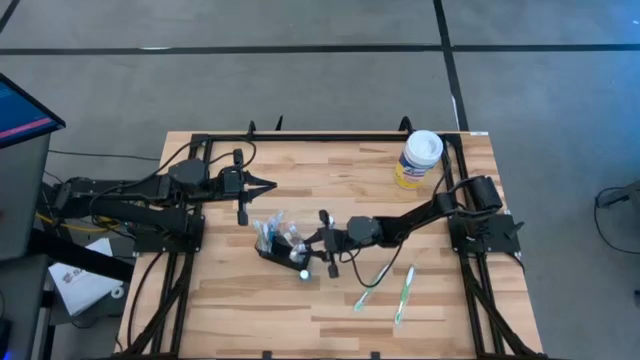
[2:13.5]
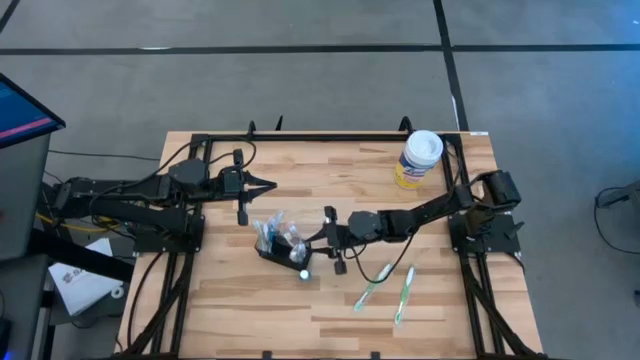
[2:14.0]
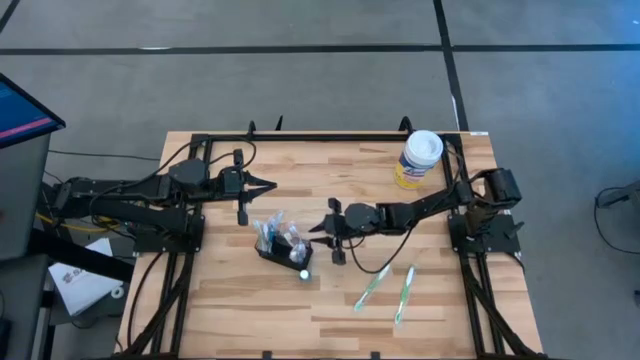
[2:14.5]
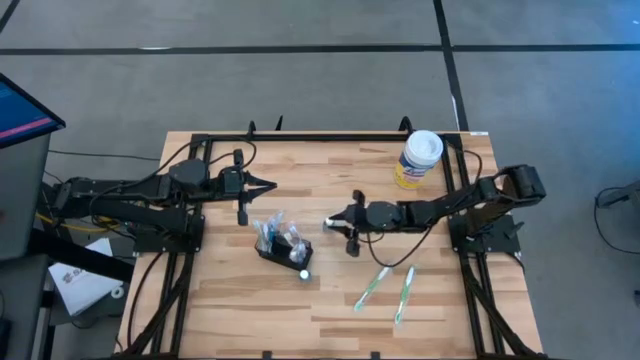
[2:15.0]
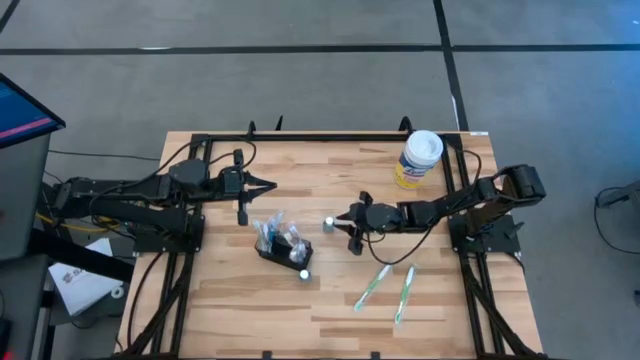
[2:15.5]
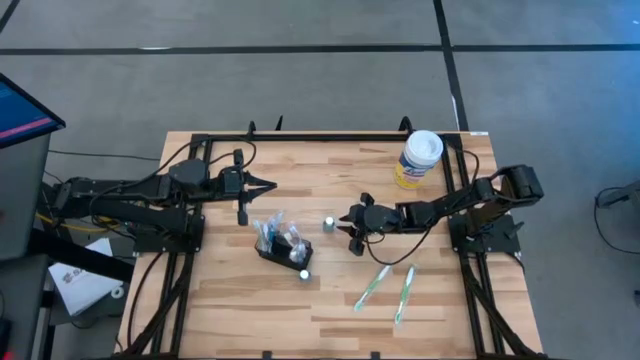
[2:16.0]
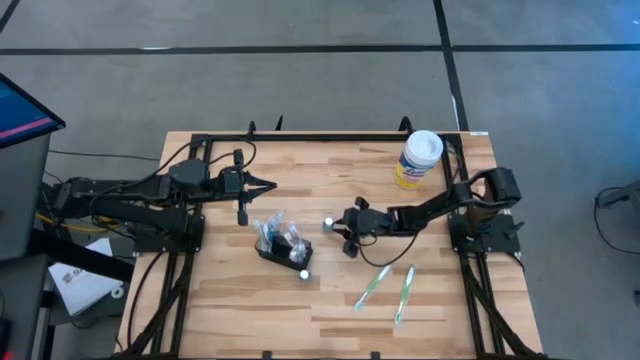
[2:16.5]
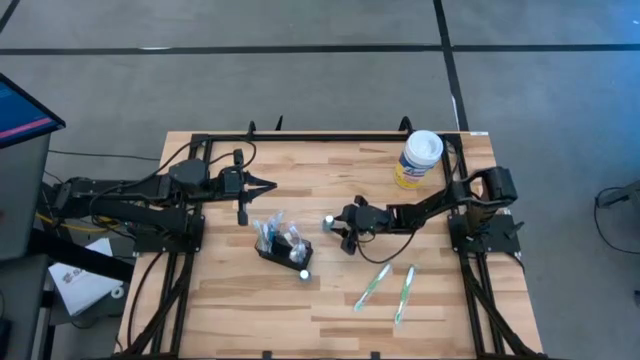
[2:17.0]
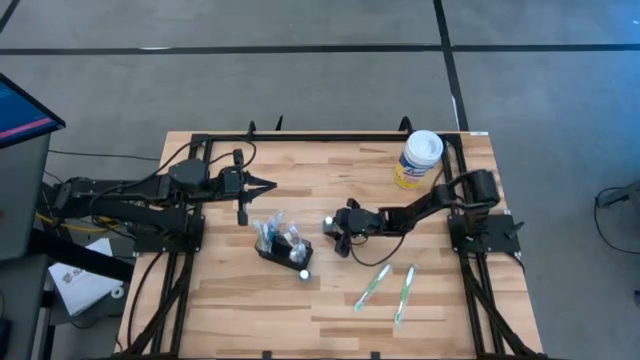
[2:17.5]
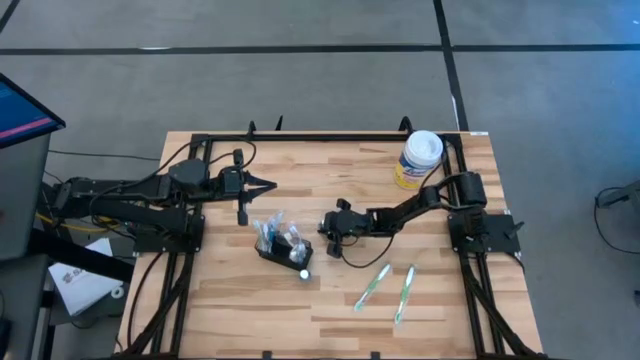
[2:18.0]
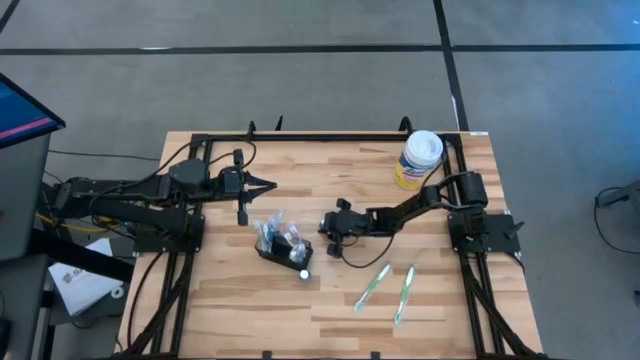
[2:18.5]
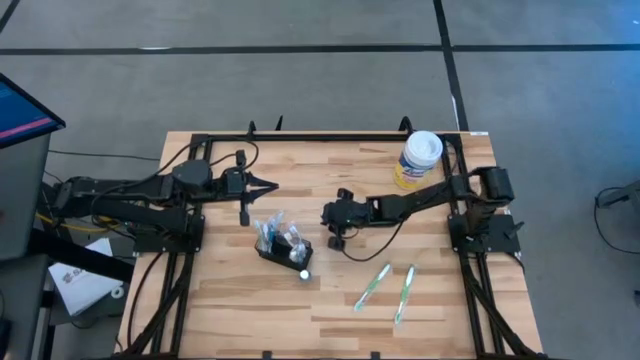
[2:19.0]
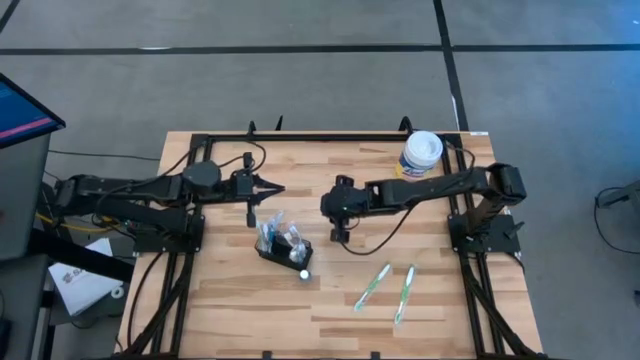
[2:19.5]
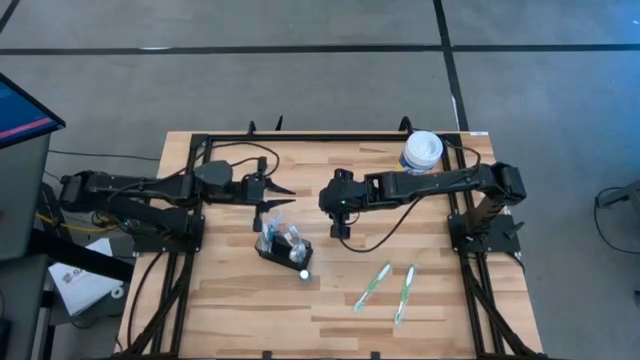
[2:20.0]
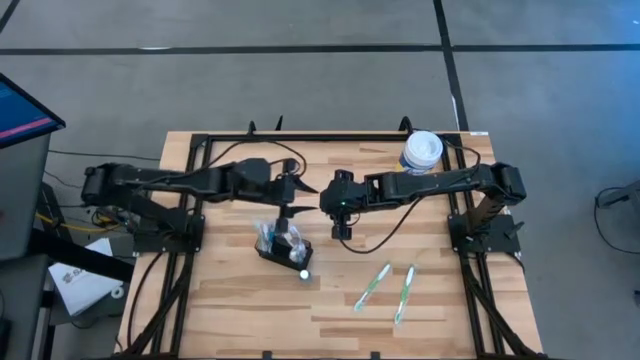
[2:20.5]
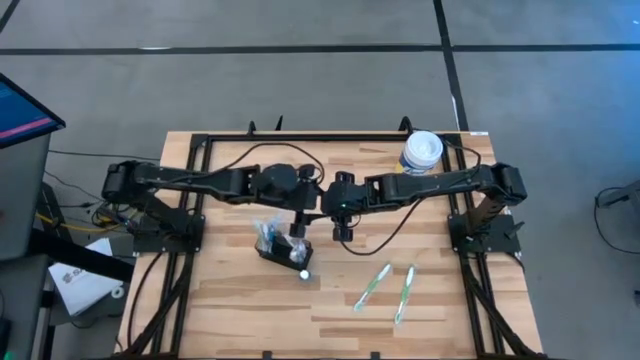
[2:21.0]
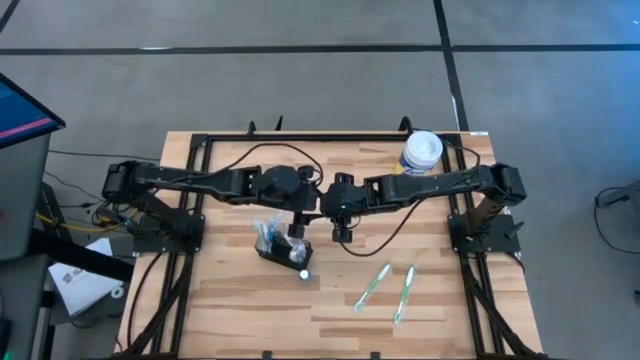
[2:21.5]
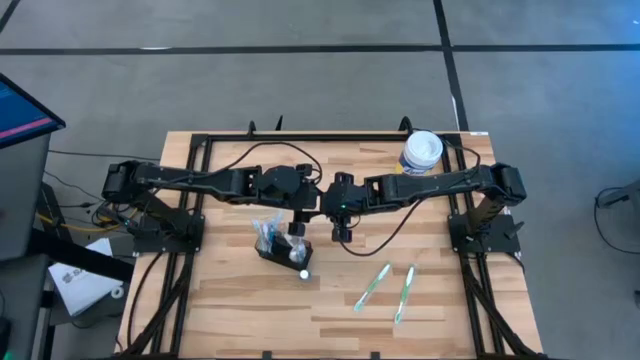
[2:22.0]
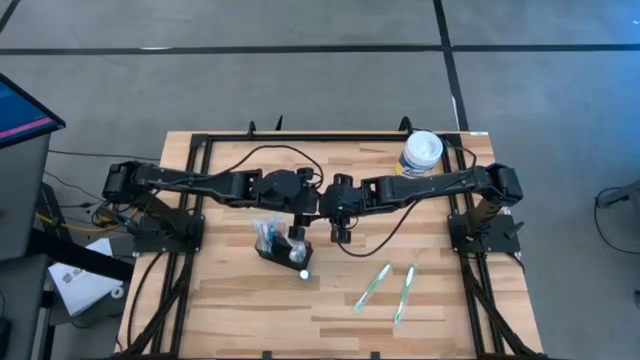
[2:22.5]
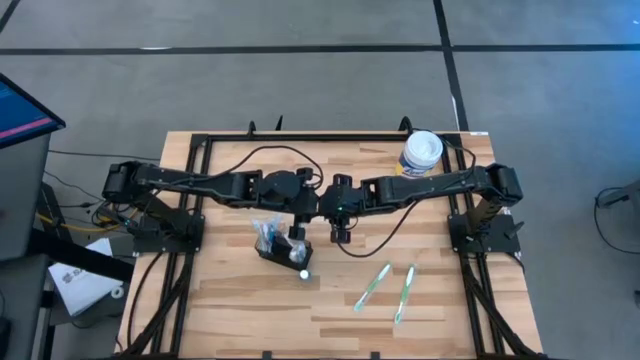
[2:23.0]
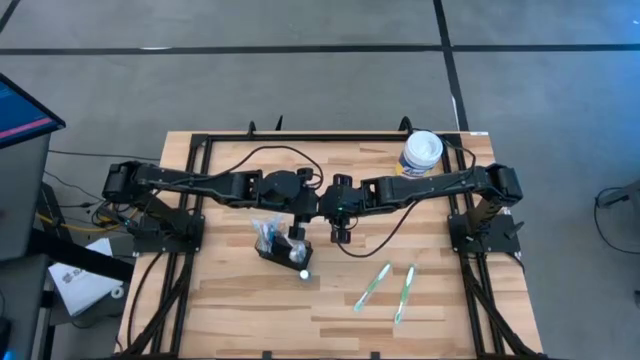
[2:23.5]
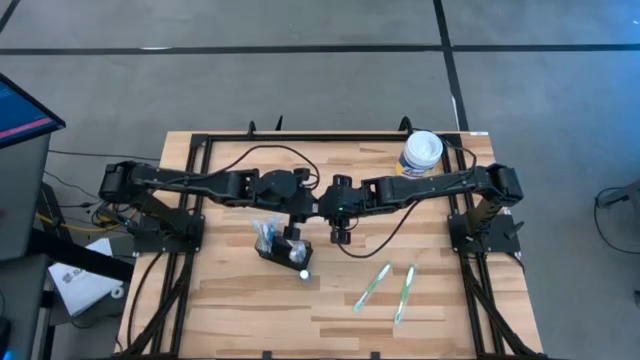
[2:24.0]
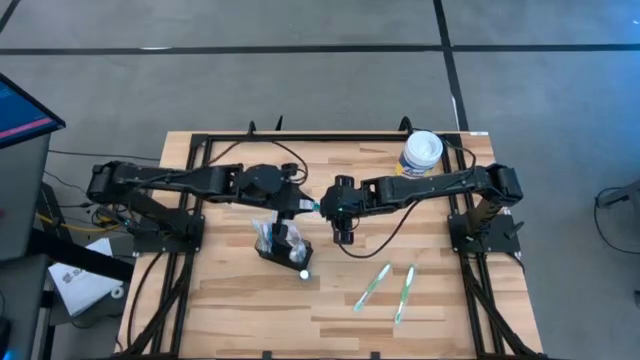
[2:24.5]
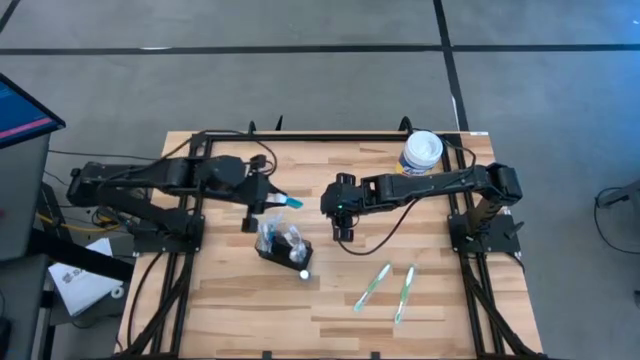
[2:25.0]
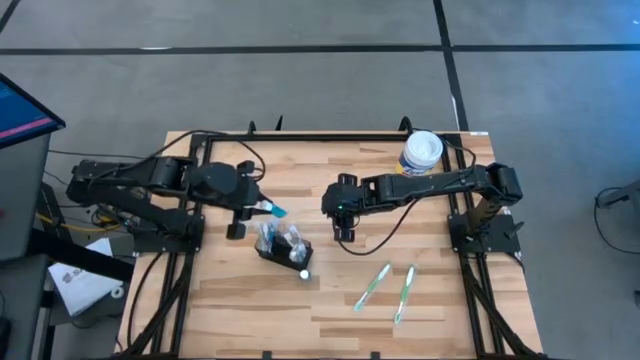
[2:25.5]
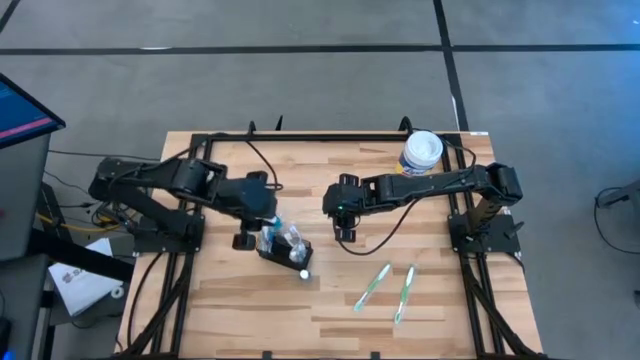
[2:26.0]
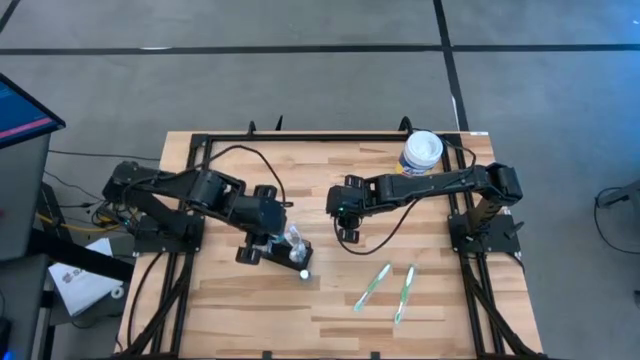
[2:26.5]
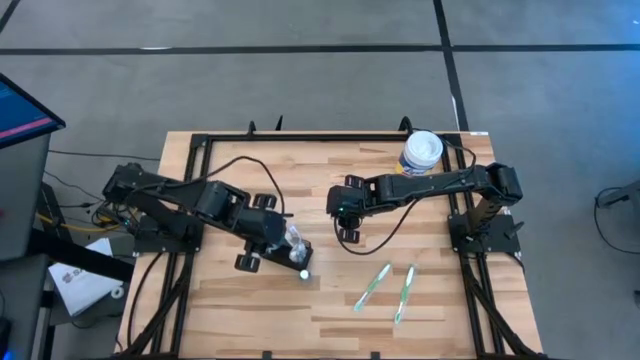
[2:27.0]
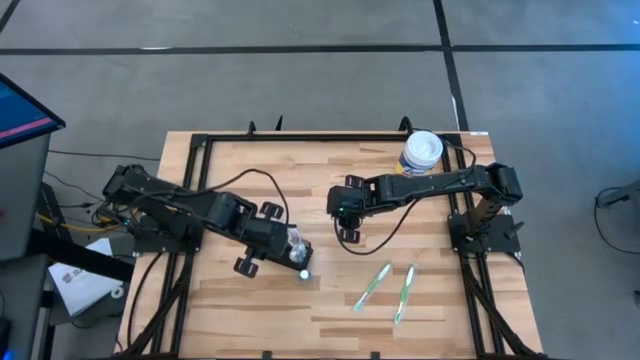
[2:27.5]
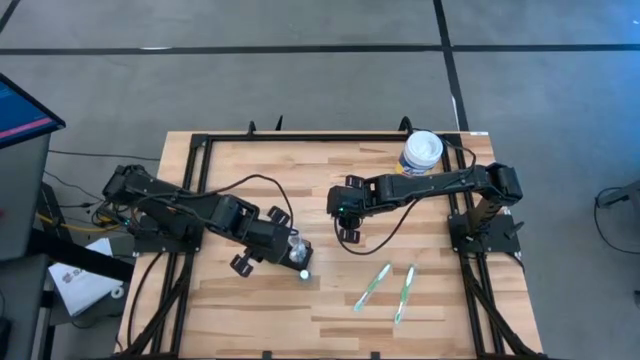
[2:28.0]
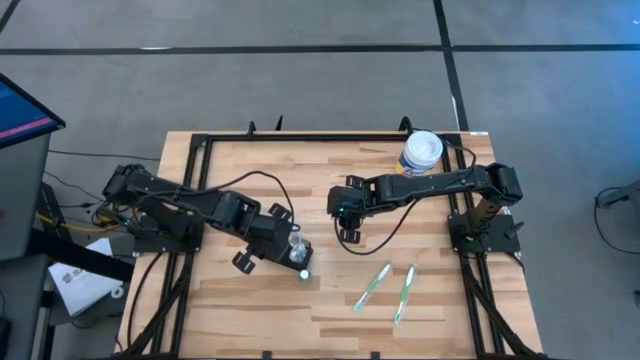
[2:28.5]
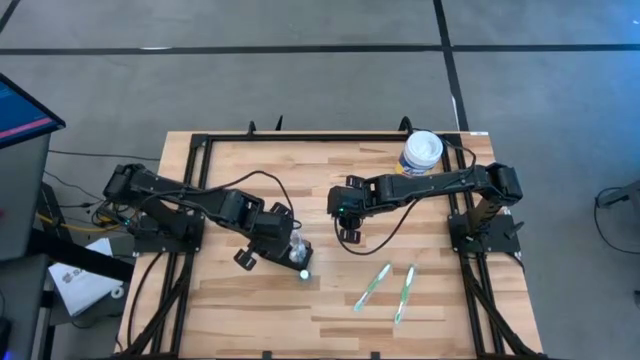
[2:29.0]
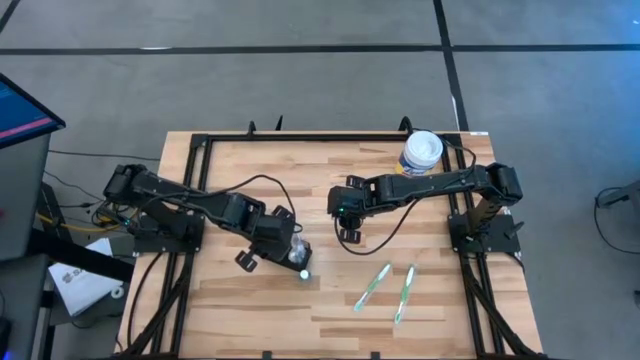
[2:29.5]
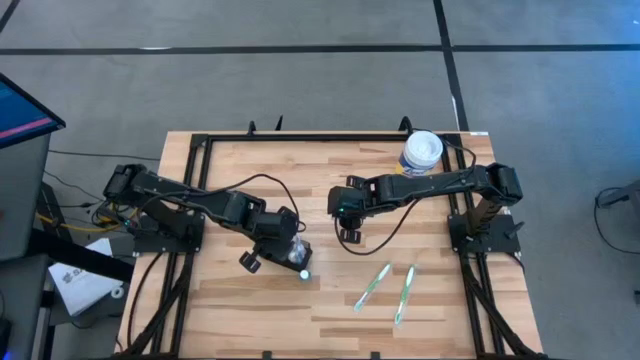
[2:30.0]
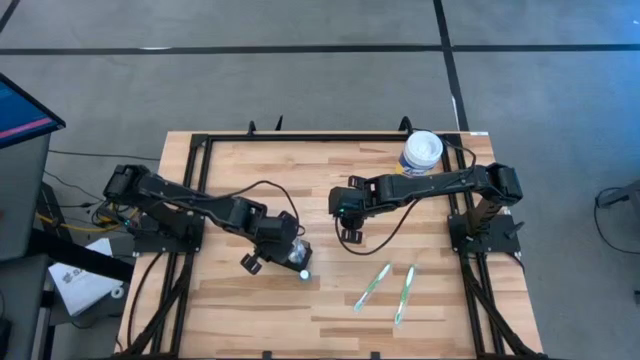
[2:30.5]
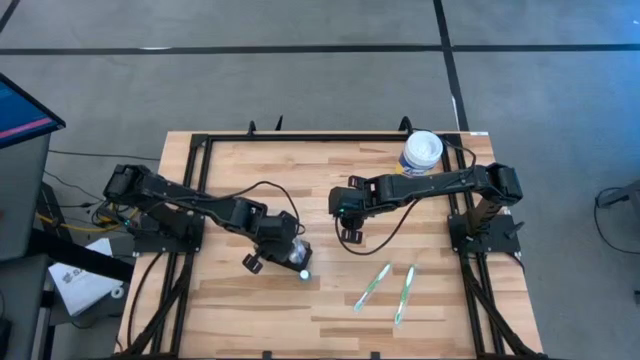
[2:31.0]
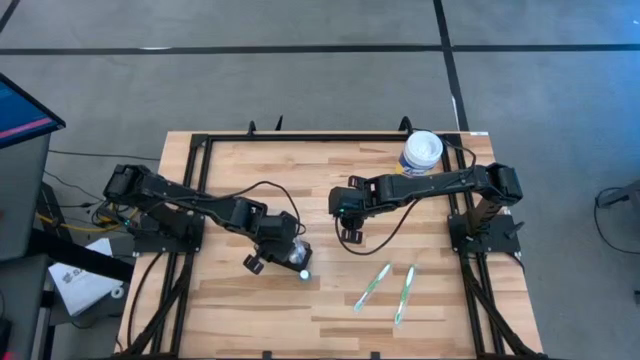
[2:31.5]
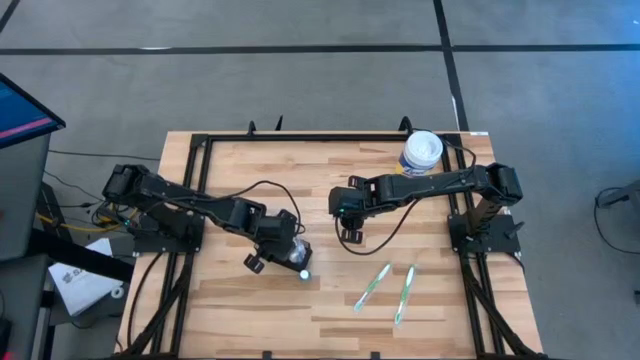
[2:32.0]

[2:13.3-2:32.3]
Task: Pick & Place toothbrushing station
Put the top blue mouthwash into the middle compartment of the wire organizer

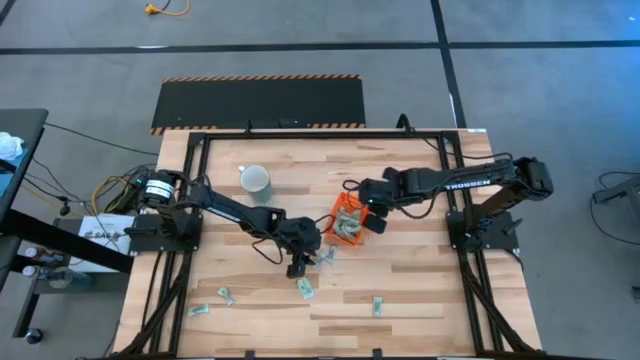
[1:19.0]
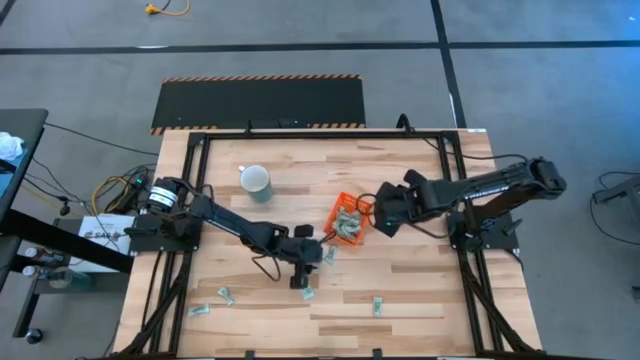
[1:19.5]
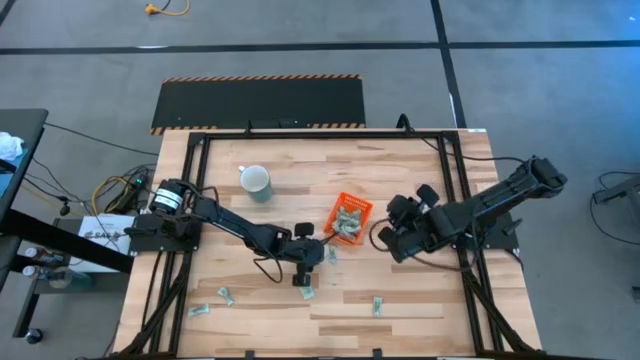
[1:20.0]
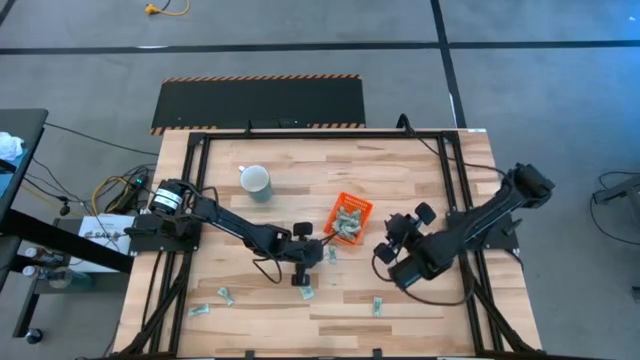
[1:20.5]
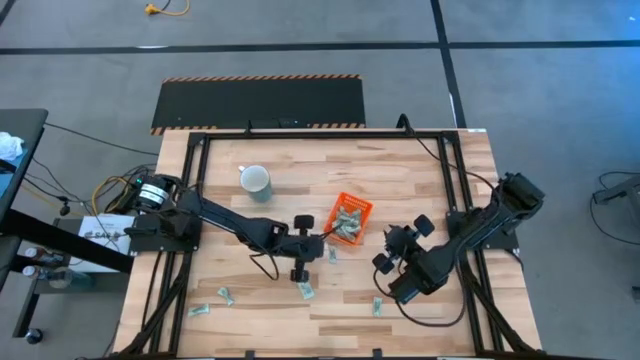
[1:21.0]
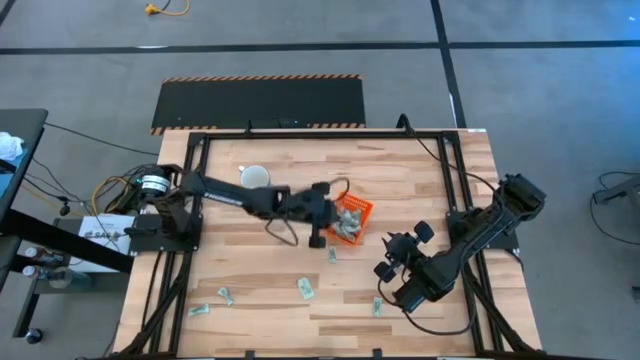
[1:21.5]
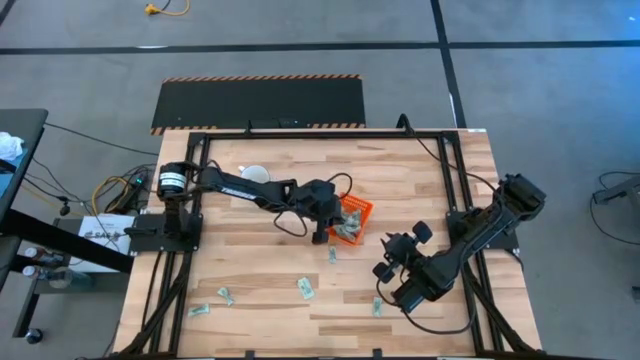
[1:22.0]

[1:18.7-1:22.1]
Task: Pick and place Stevia / Truvia into bins
Put the stevia packet into the basket
